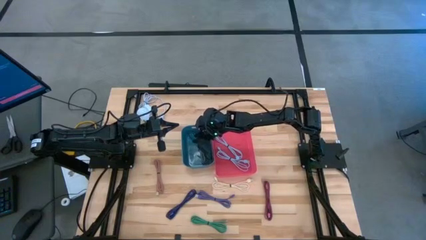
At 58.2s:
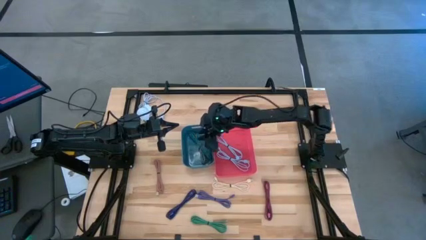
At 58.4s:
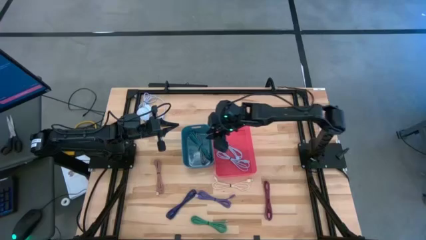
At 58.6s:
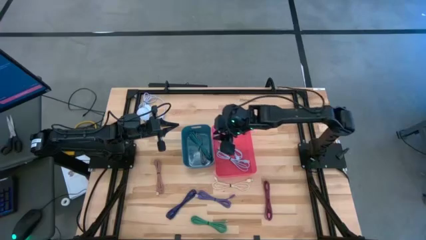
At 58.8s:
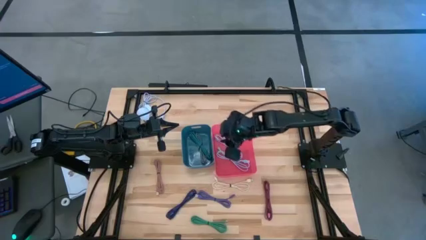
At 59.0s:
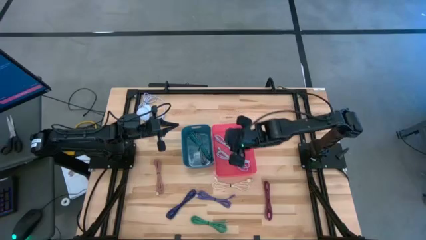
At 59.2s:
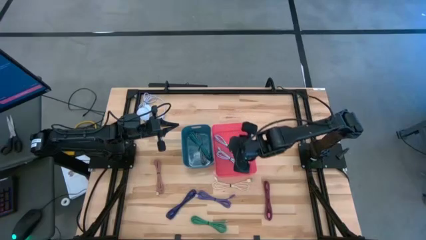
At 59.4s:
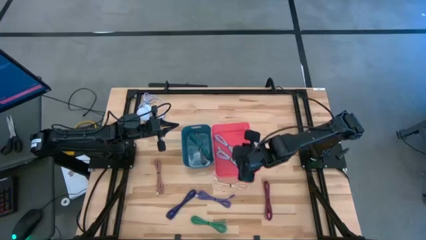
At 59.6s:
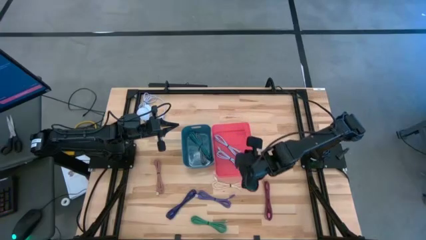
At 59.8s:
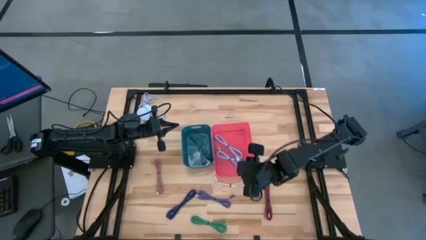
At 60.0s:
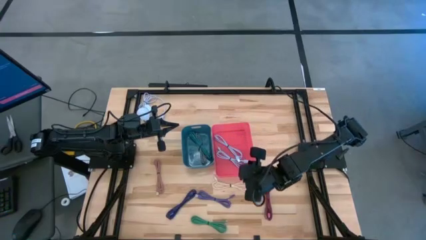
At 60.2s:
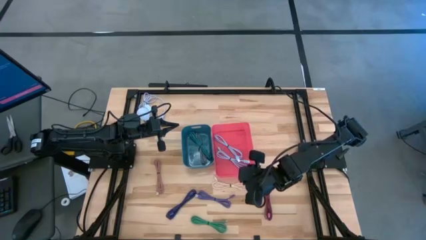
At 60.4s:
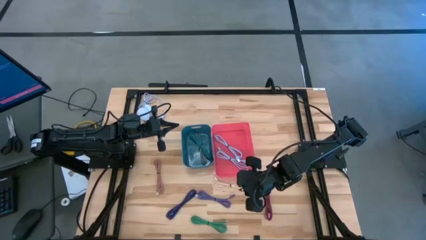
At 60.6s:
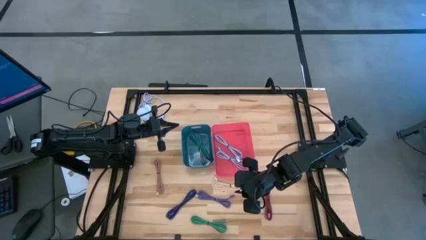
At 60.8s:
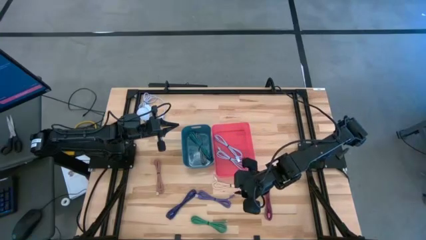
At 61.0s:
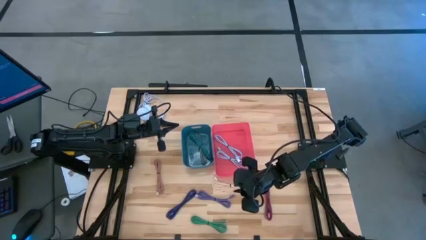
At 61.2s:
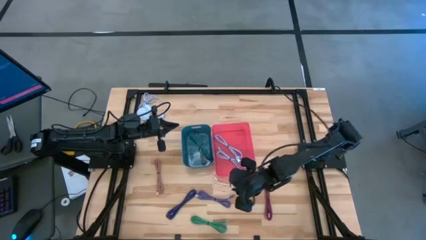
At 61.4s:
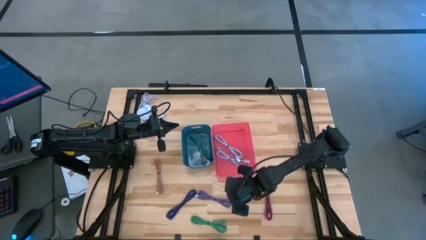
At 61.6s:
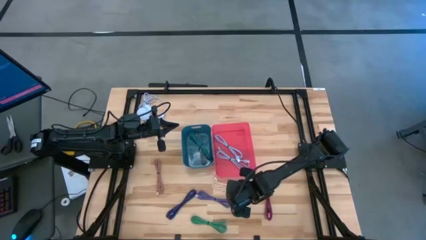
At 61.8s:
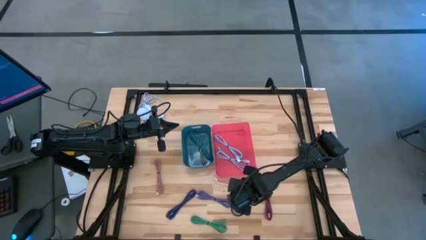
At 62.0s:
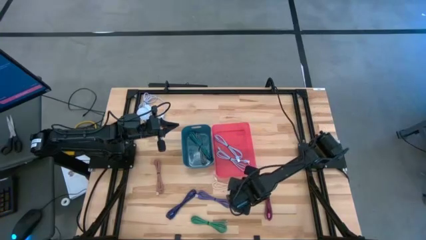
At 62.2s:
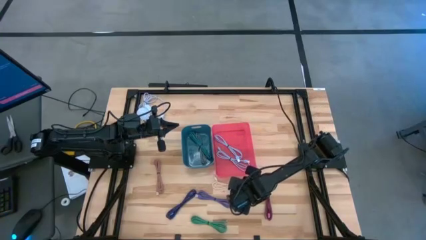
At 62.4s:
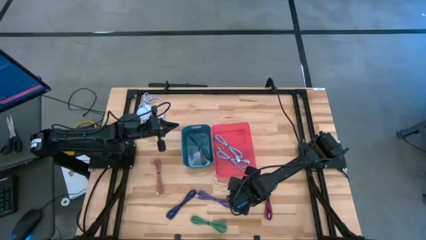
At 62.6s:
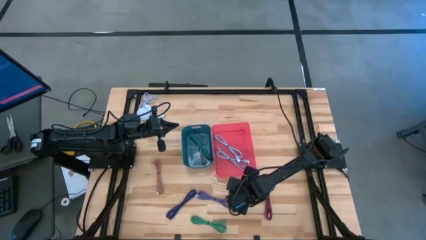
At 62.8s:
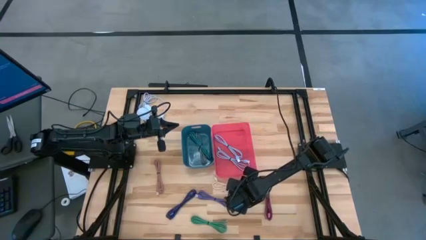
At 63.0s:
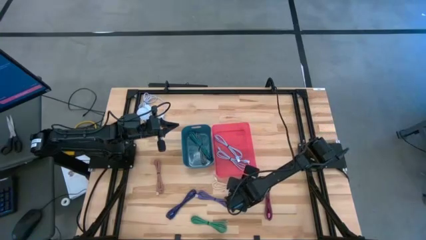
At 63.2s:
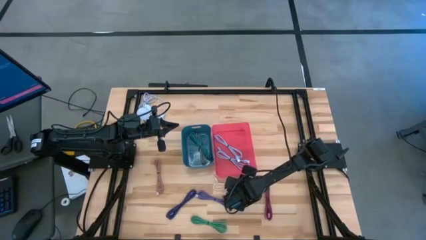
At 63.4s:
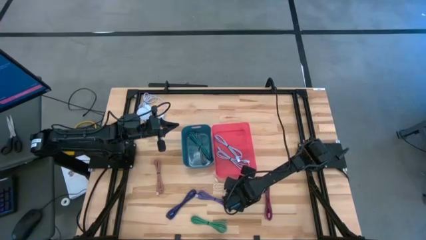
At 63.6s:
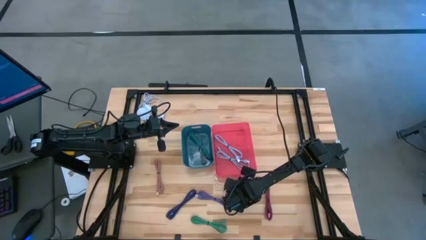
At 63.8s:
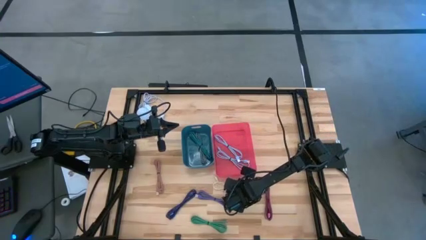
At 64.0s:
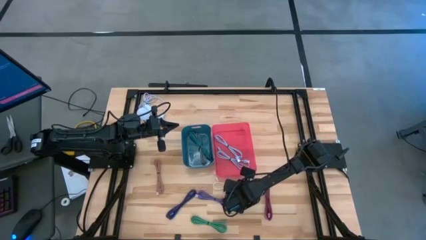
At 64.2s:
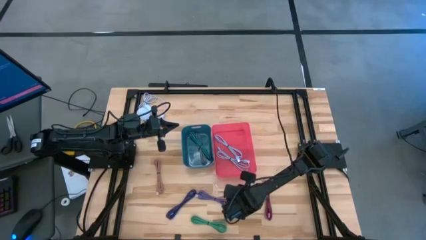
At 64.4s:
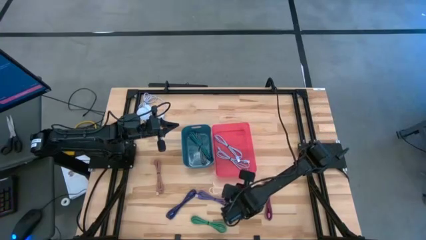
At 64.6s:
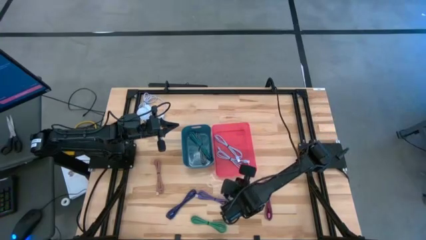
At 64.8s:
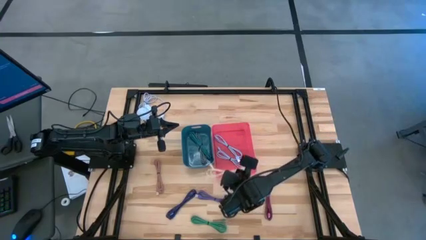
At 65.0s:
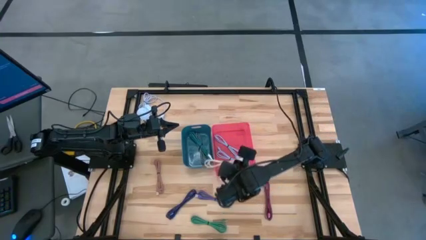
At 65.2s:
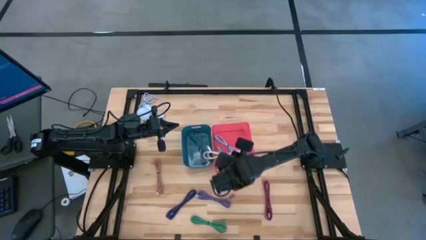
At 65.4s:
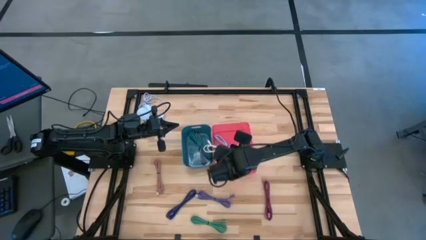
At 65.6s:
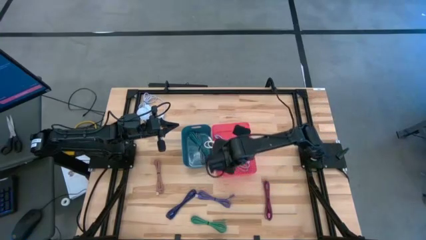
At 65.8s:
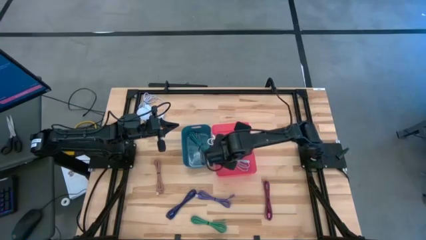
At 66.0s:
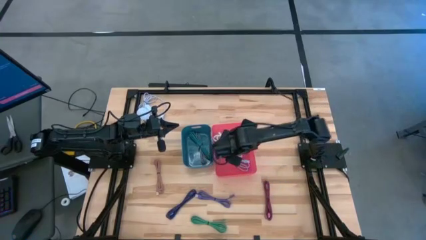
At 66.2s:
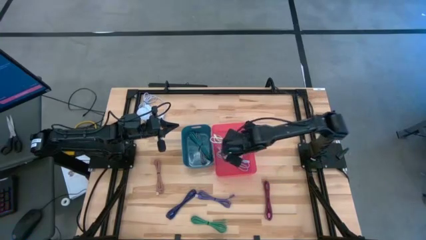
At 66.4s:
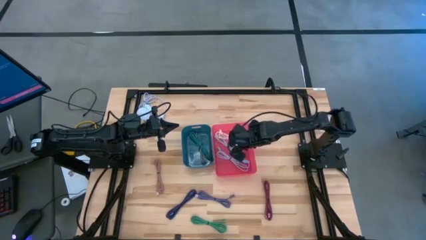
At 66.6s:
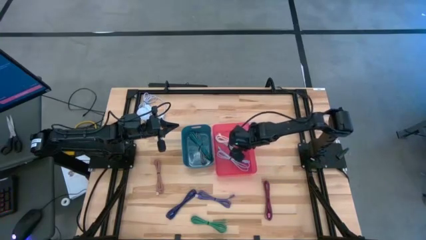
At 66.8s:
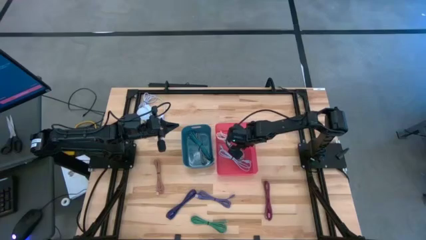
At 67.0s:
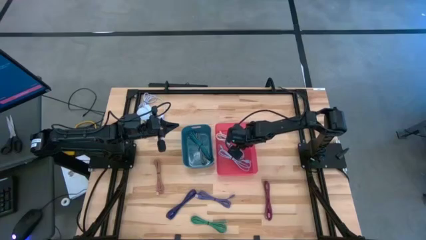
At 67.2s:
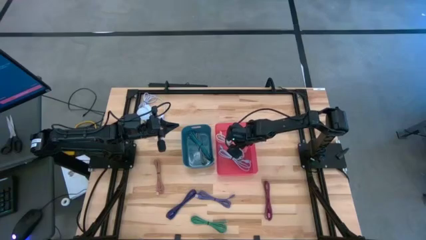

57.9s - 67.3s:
Task: Pick & Place USB Port
Put the brown charger cable into the red bin

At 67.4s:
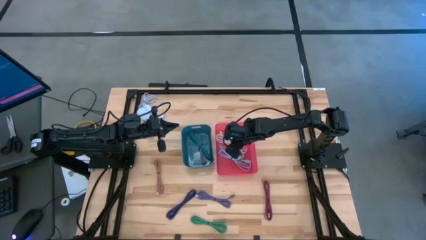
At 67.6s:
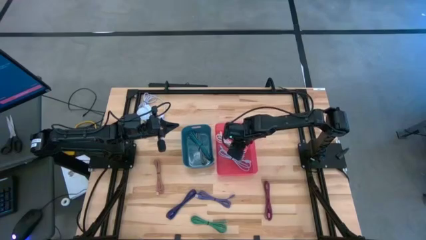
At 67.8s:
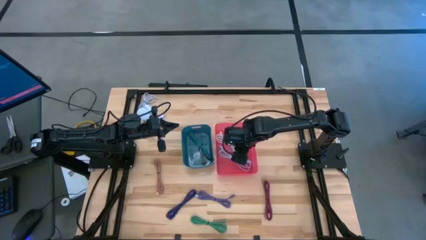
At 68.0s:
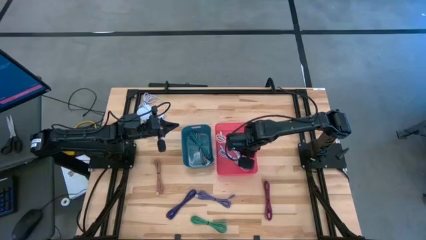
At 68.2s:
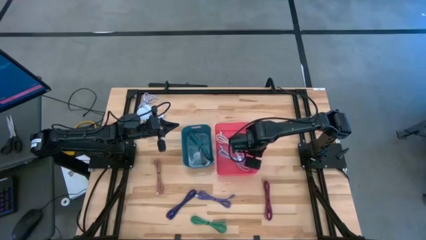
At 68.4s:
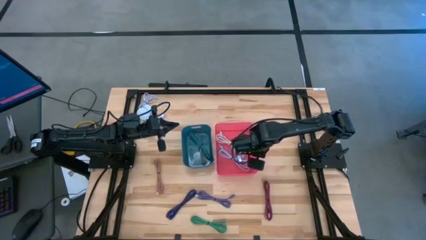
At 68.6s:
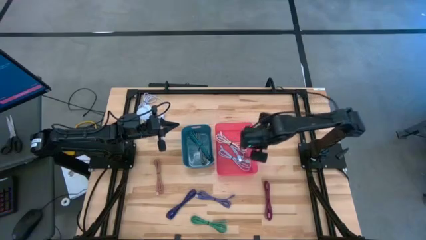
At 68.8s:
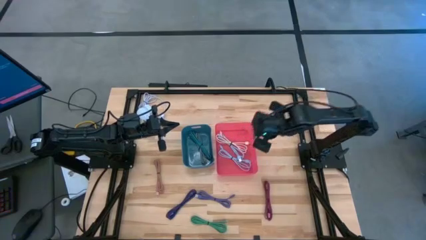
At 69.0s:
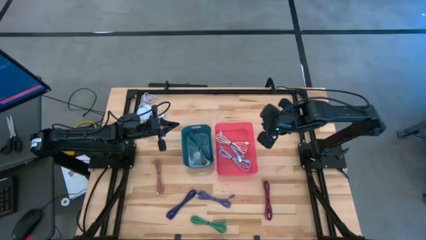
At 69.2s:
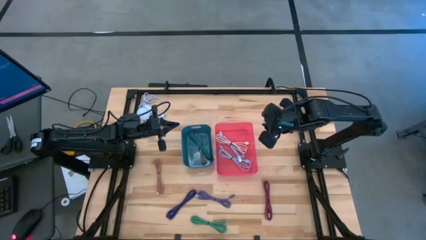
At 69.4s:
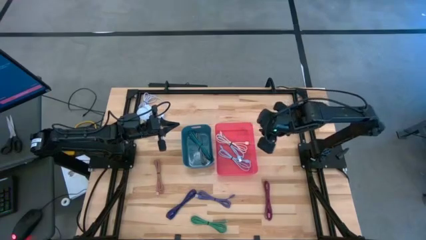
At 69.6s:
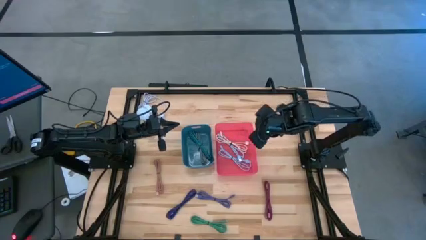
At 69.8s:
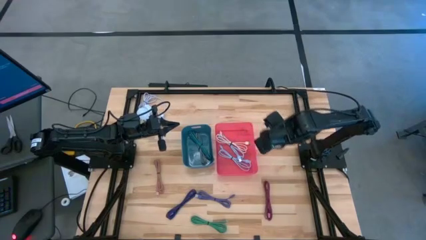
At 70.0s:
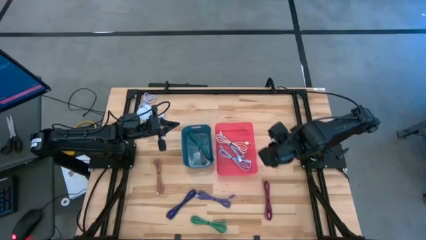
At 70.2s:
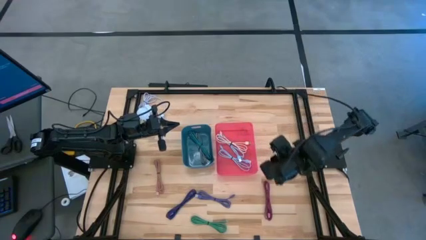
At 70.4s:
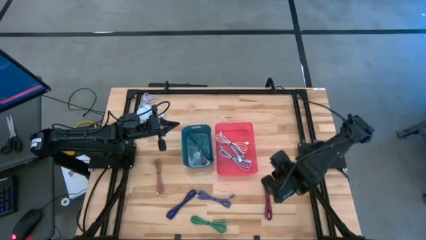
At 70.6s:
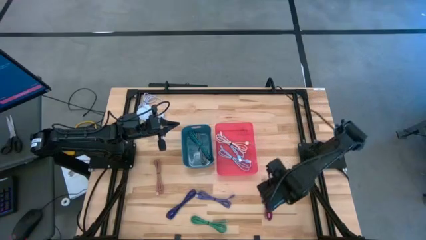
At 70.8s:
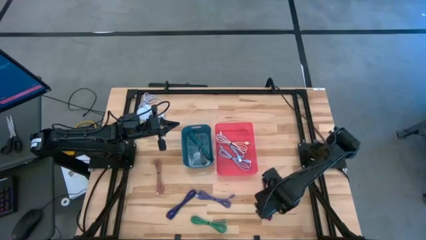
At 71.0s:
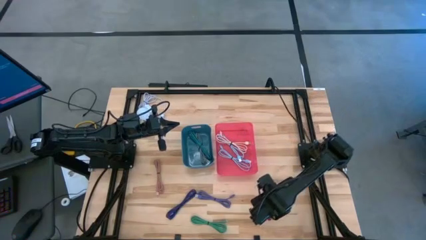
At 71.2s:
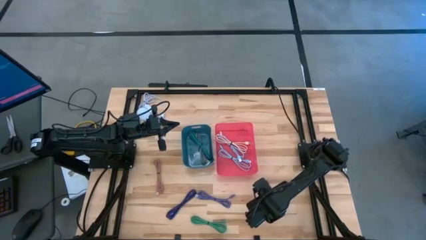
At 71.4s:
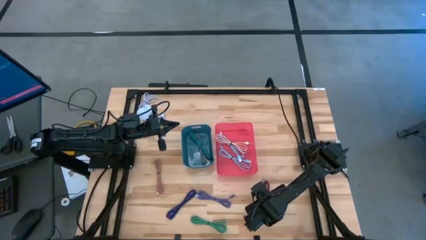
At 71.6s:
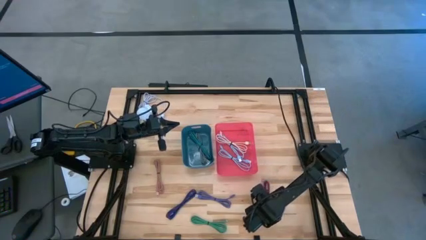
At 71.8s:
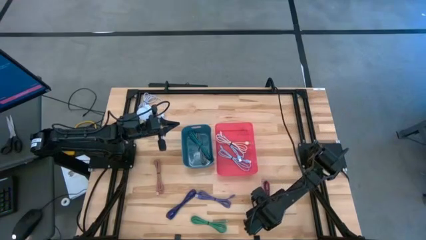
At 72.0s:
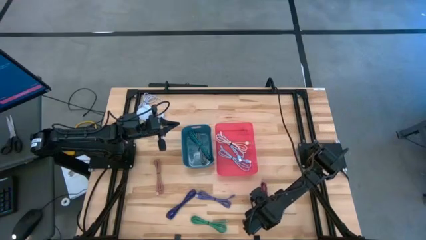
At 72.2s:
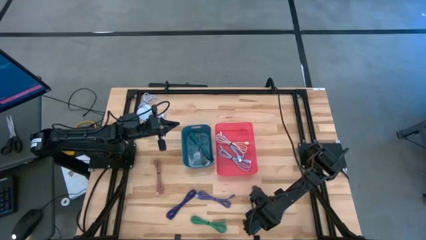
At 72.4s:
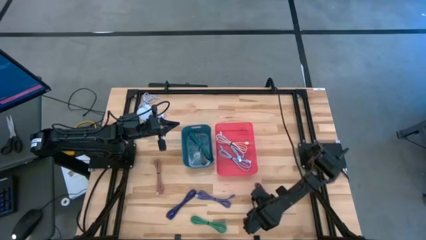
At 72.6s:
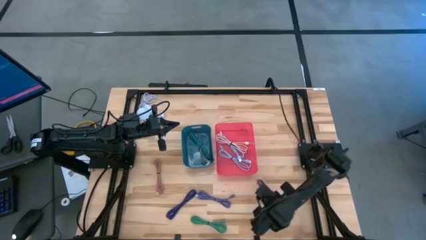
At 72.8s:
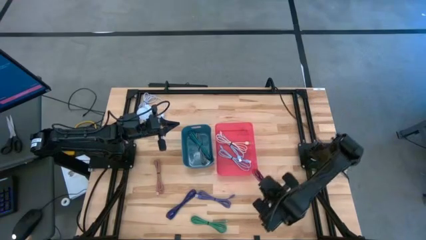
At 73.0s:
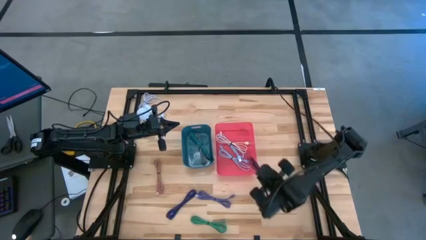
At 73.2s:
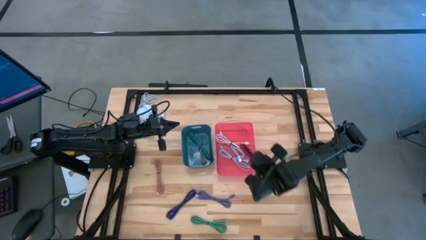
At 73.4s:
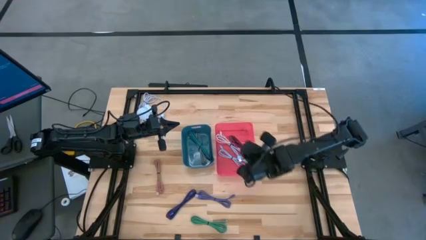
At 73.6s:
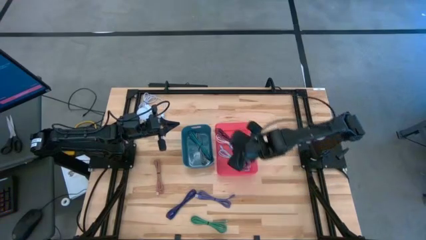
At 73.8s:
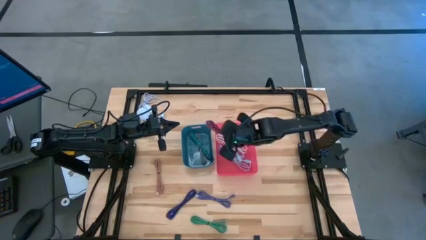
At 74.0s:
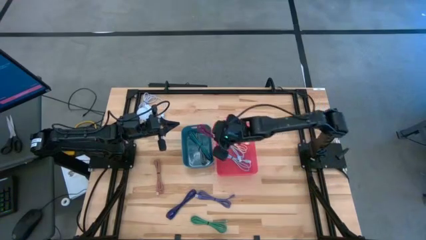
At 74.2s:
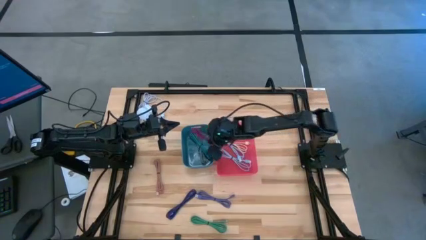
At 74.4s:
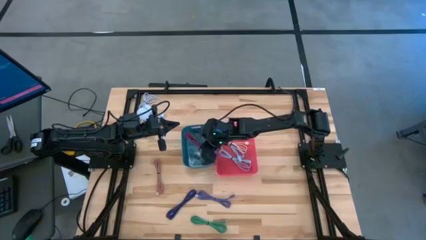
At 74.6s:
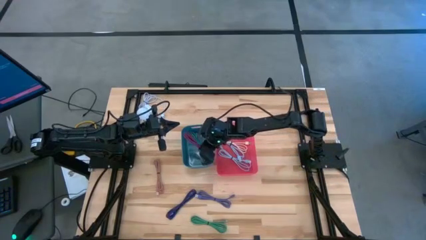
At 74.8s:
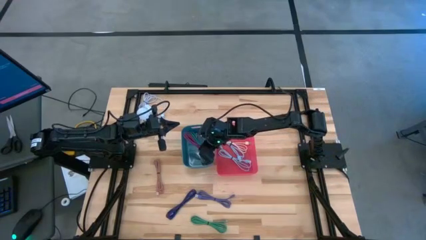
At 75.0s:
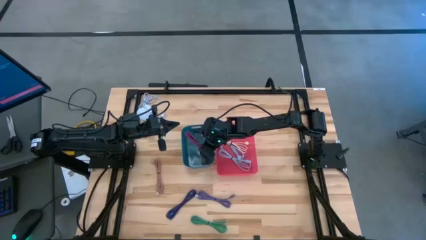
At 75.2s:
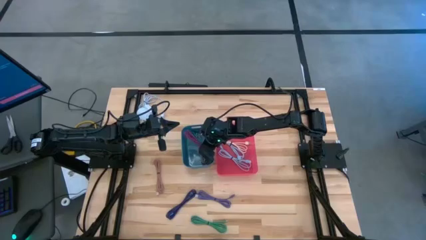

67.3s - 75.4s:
Put the patterned pink charger cable into the blue bin
